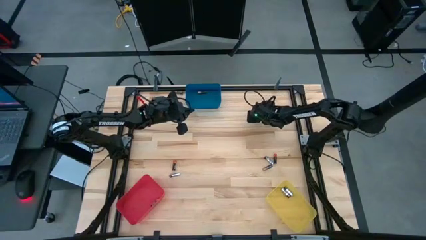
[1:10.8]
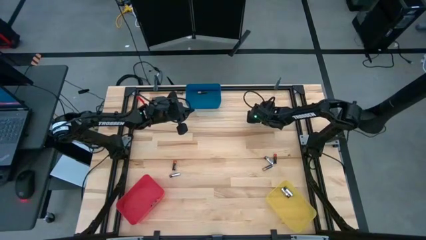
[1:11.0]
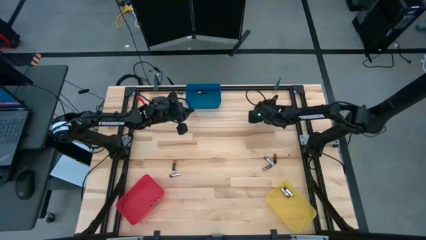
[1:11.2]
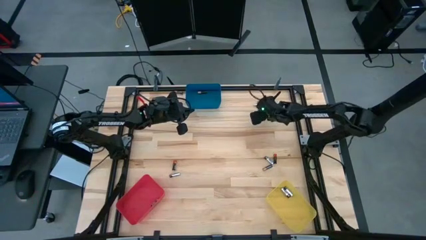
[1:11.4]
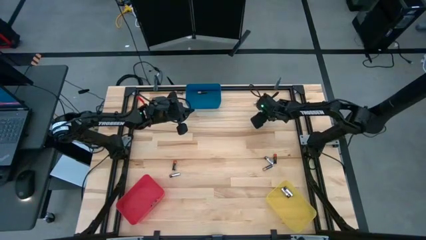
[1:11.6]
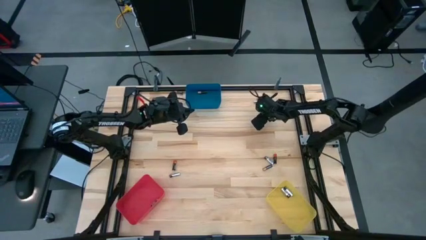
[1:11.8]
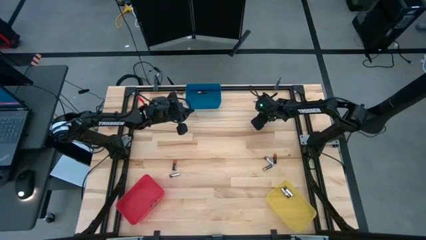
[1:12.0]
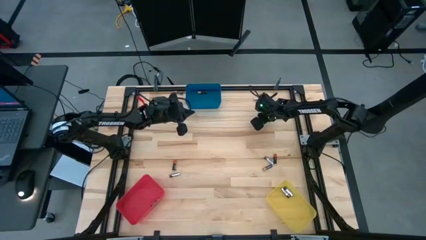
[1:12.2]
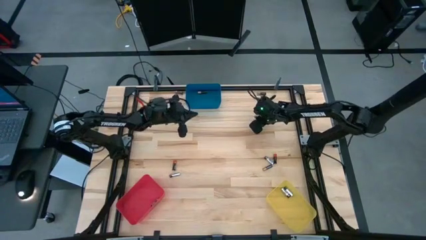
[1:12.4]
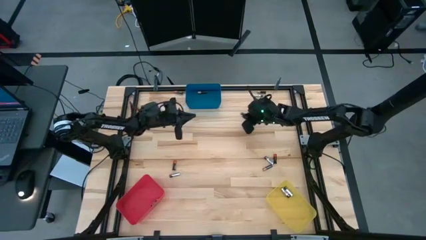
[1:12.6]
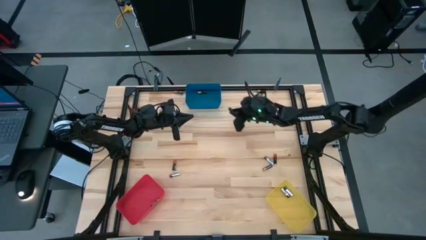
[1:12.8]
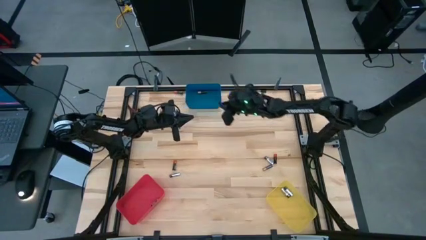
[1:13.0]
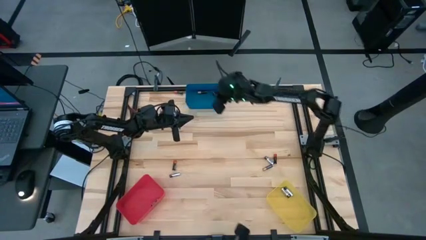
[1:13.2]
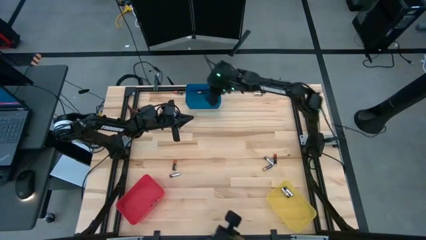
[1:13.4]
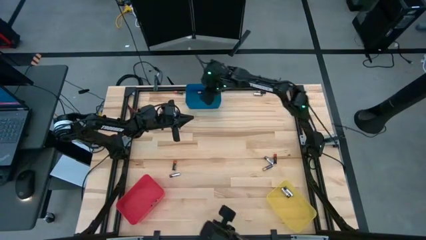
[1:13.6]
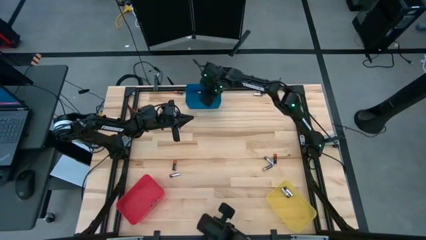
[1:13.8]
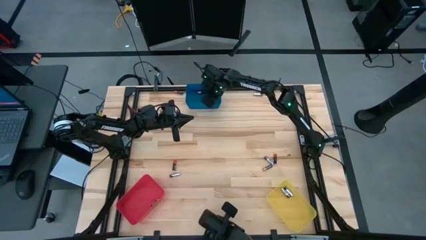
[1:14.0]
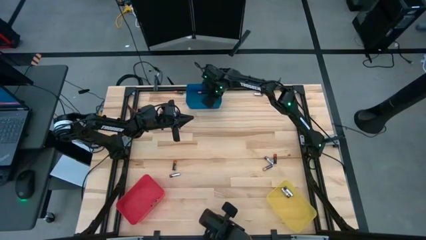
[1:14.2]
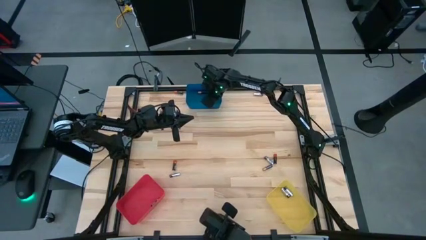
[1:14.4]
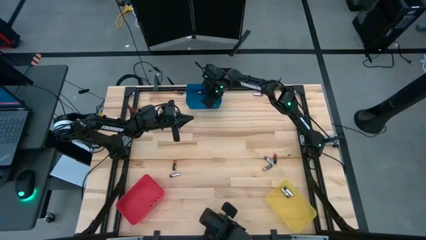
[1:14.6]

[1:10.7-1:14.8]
Task: Sort batteries
Put the black-brown battery into the blue bin

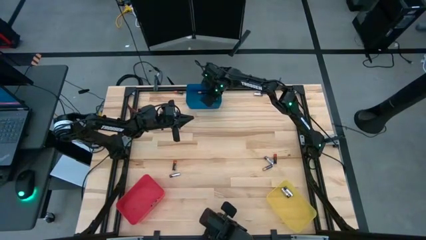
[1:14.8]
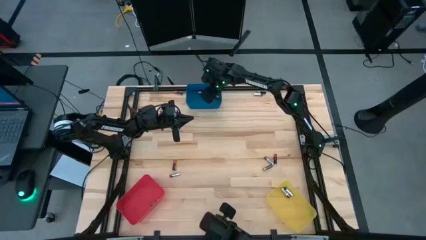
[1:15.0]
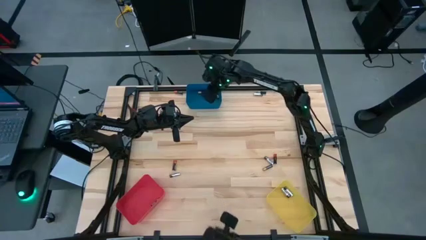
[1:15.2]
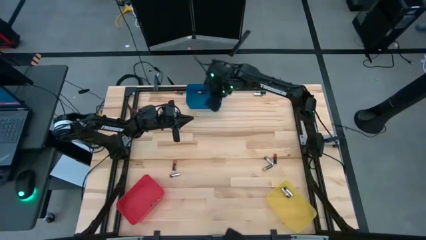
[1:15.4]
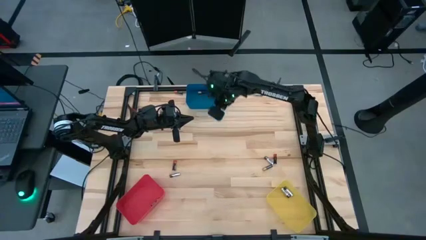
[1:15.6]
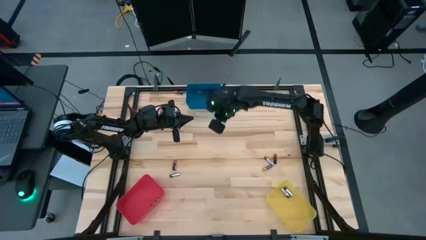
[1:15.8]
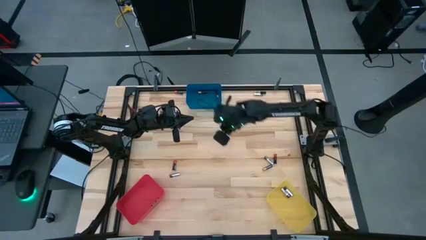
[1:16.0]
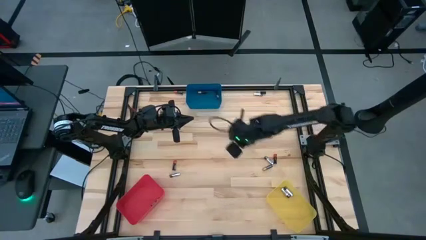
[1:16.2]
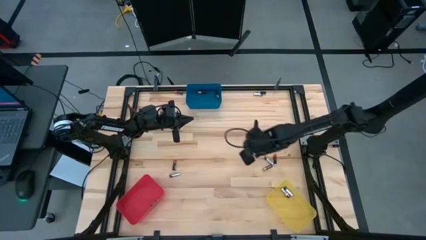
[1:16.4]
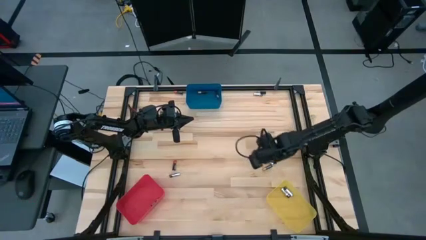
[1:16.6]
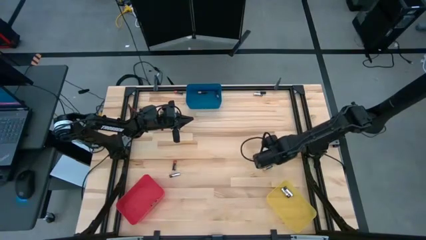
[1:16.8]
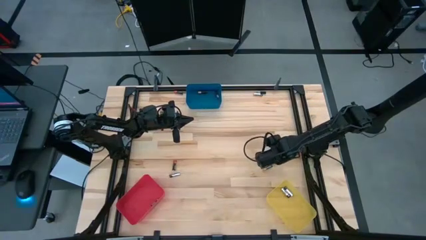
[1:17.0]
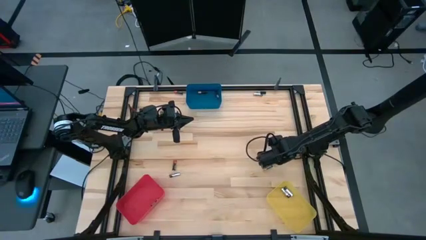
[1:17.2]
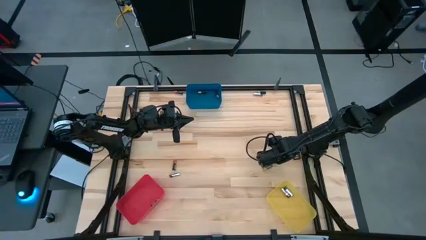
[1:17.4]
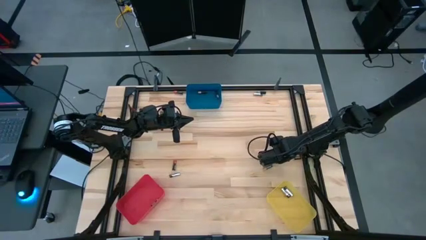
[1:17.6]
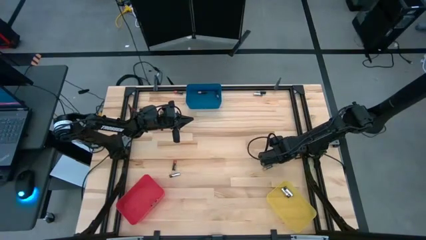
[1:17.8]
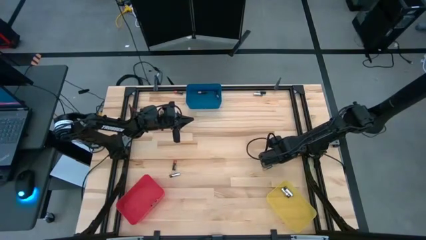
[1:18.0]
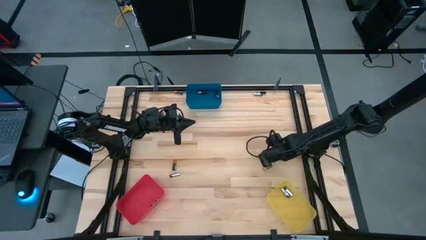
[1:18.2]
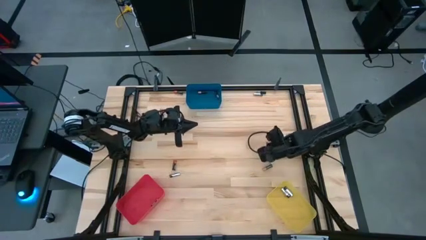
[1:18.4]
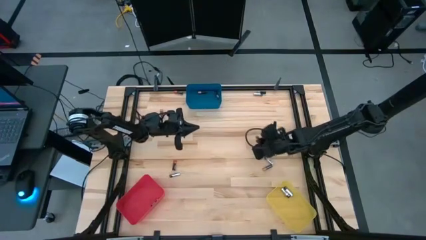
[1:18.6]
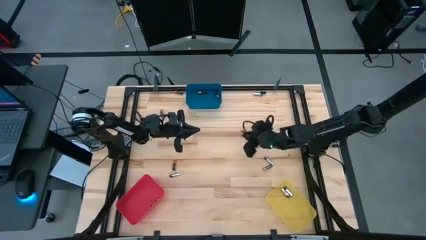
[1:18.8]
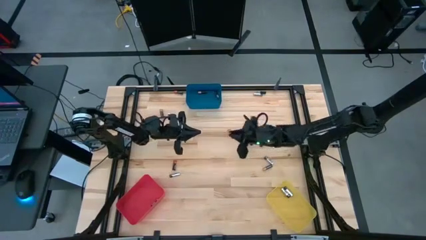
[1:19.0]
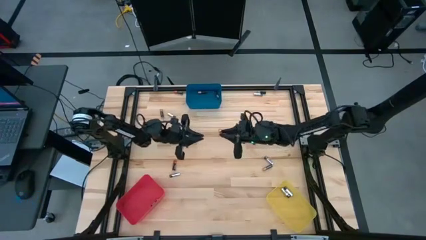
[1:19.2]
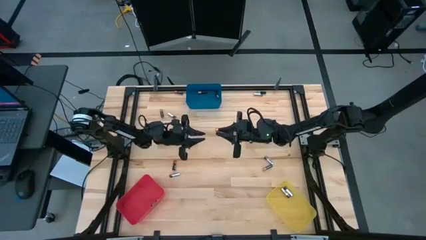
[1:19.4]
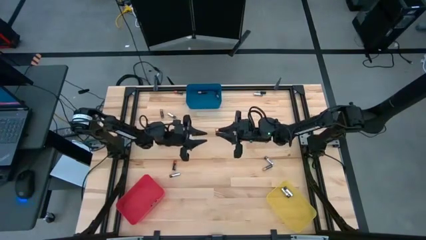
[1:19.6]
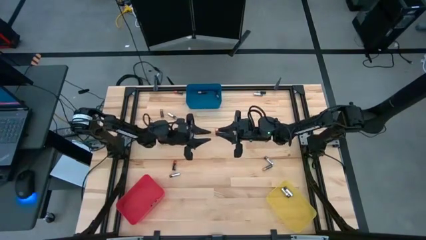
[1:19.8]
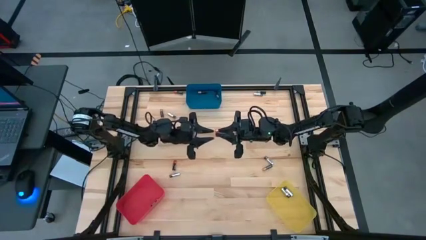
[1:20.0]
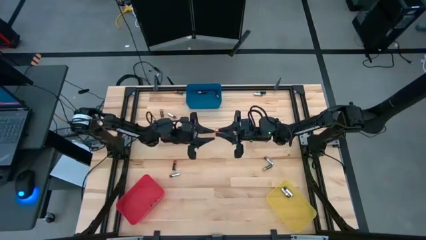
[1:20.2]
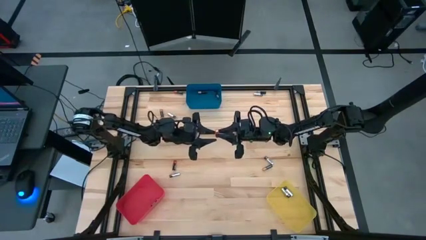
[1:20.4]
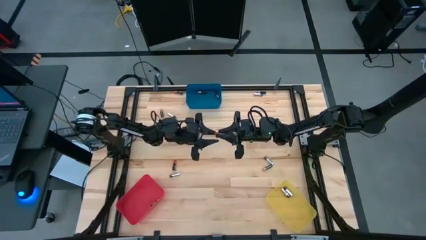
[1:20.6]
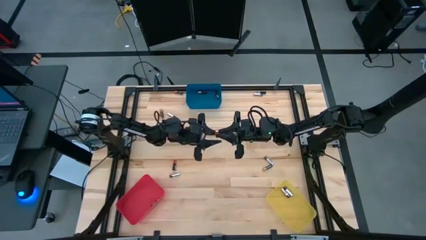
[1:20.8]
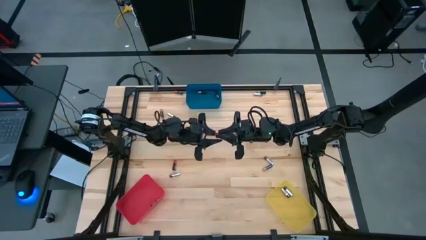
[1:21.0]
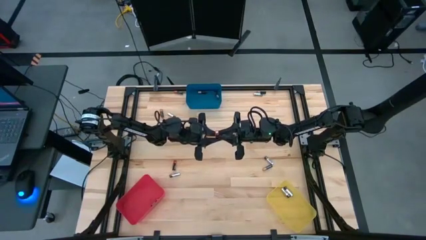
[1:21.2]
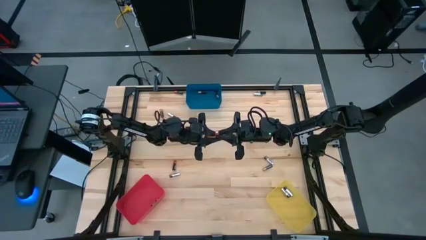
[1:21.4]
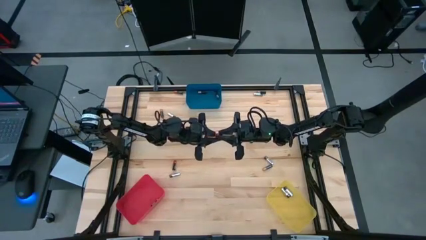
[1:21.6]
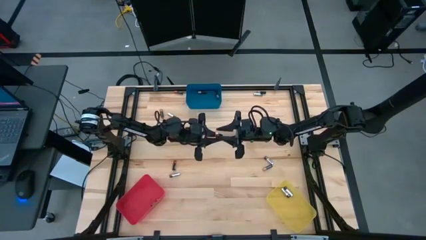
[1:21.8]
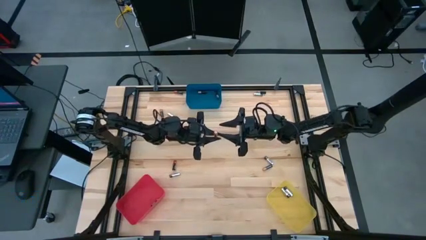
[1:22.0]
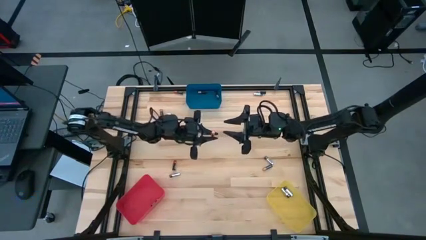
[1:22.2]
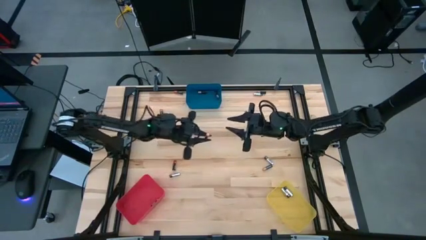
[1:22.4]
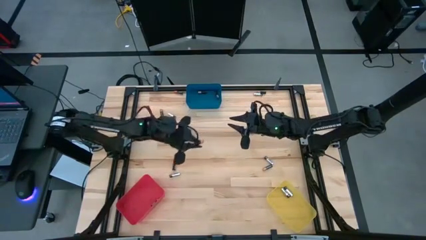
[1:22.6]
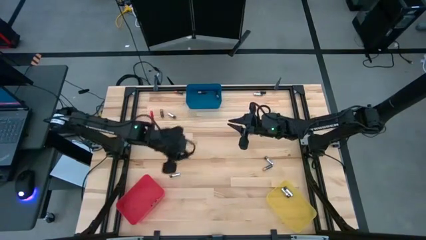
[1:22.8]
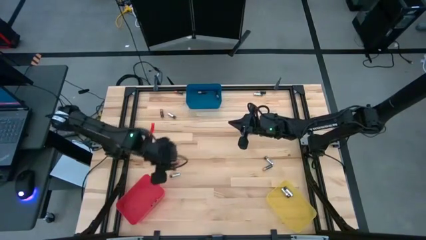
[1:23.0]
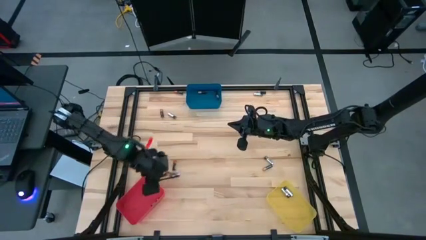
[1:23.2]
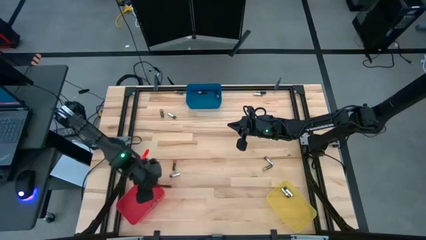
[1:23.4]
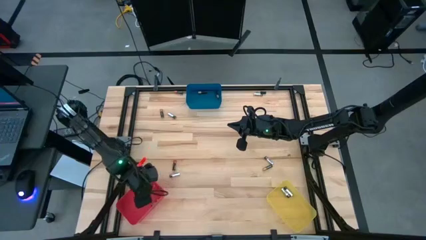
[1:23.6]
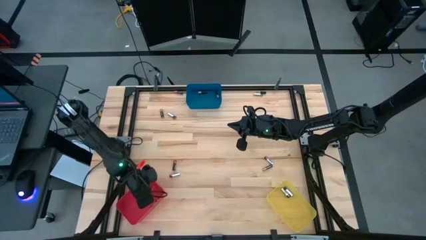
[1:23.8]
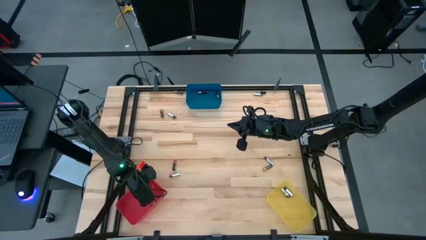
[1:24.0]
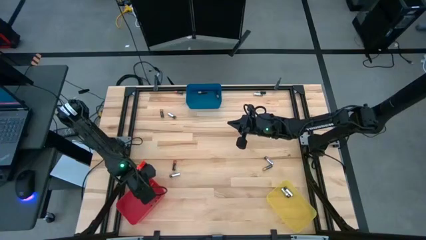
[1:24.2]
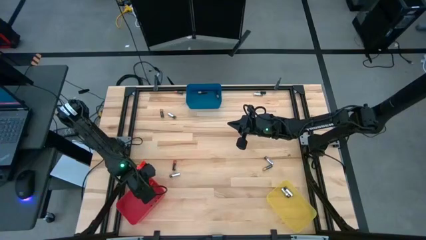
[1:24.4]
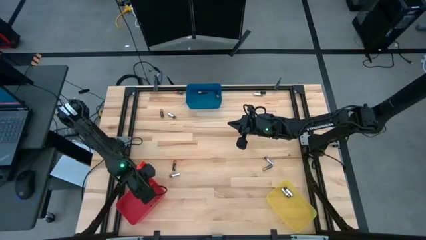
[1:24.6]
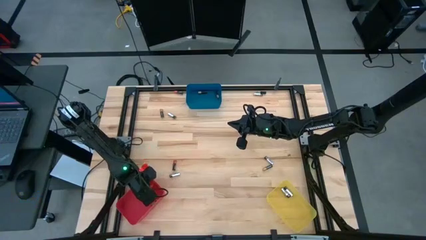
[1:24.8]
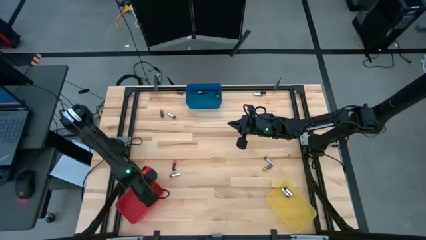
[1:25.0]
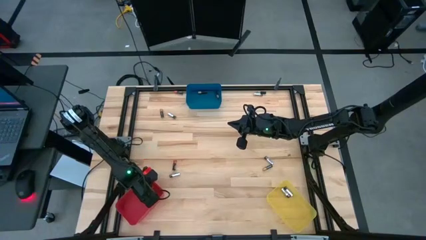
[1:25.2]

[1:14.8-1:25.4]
Put the black-red battery into the red bin
